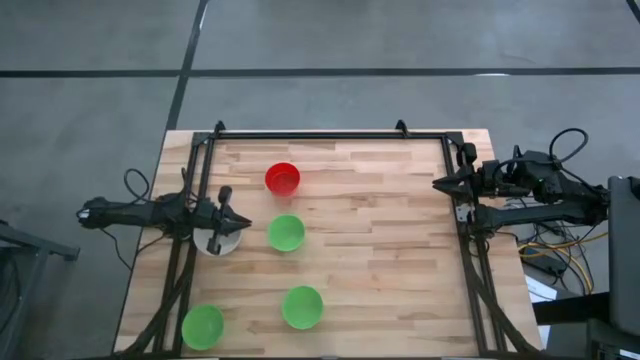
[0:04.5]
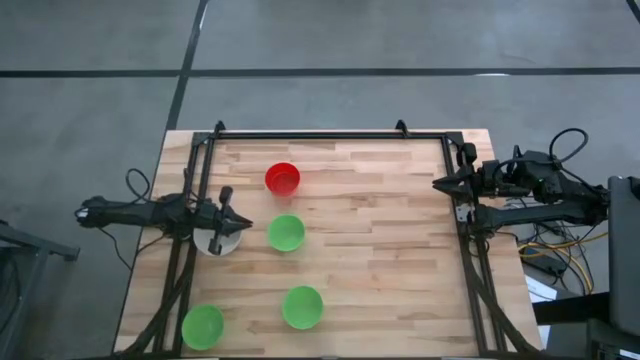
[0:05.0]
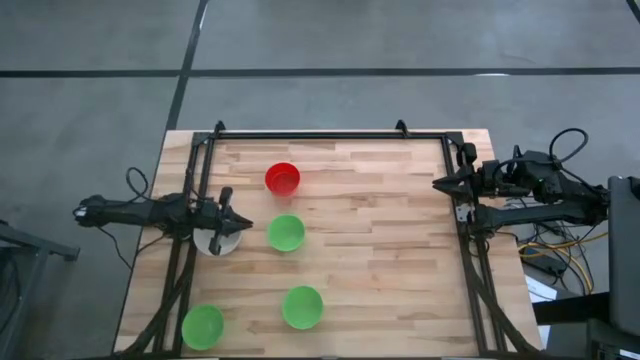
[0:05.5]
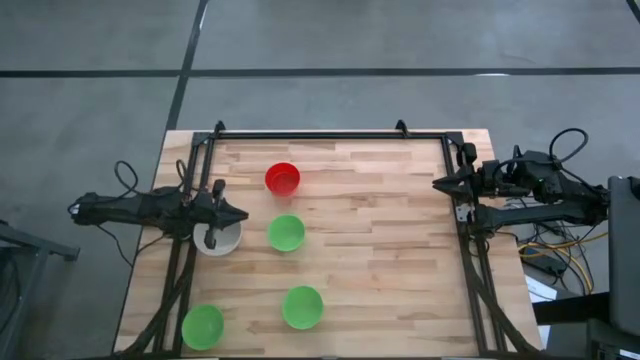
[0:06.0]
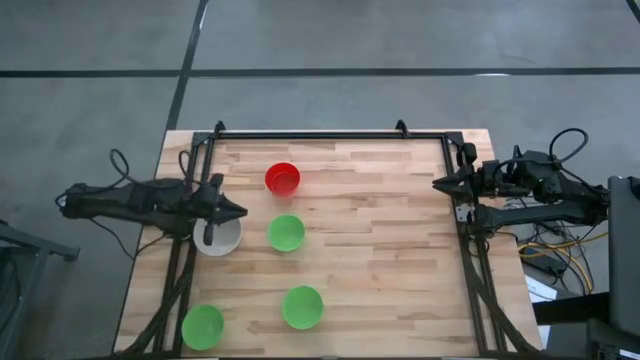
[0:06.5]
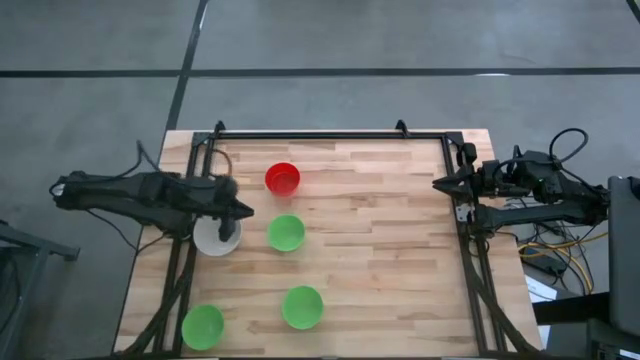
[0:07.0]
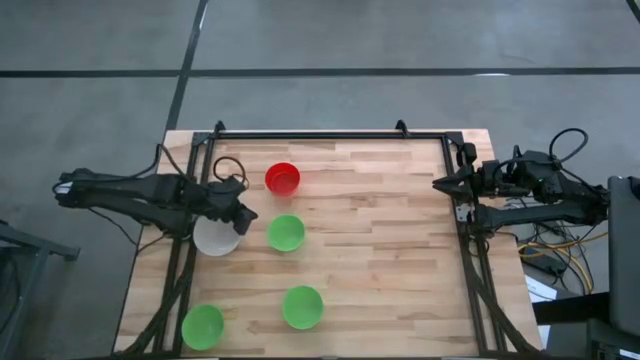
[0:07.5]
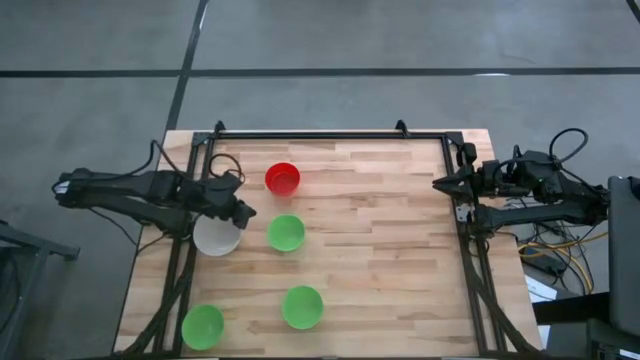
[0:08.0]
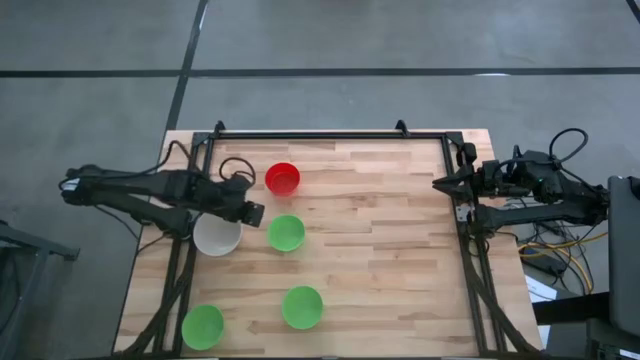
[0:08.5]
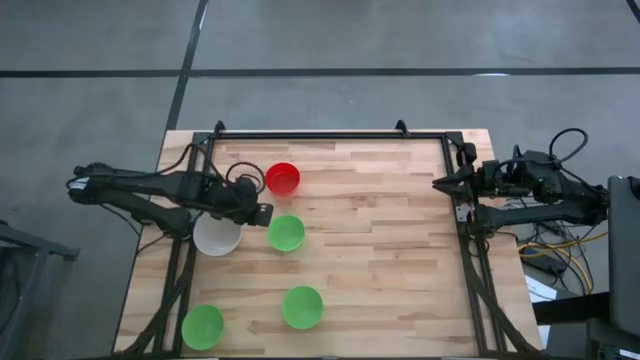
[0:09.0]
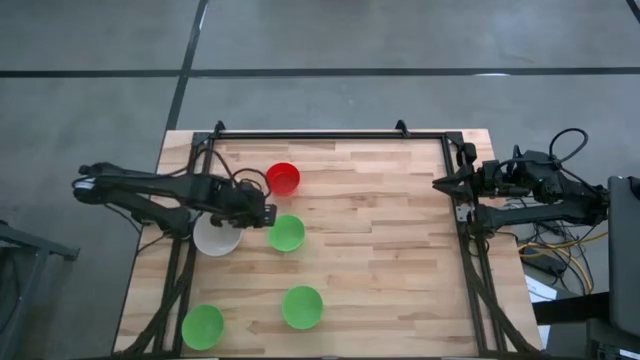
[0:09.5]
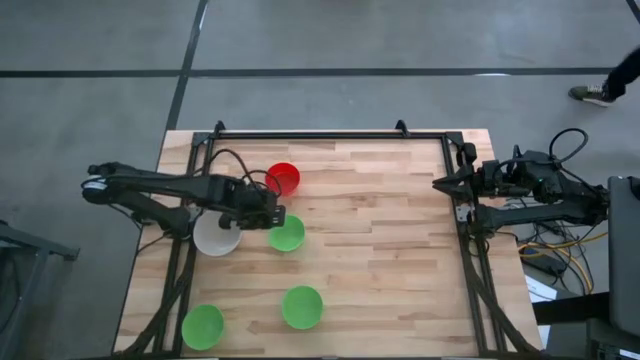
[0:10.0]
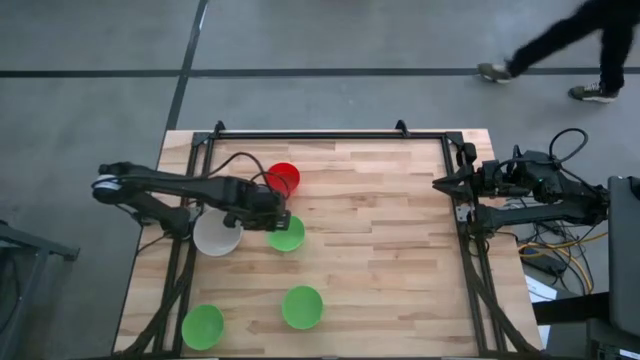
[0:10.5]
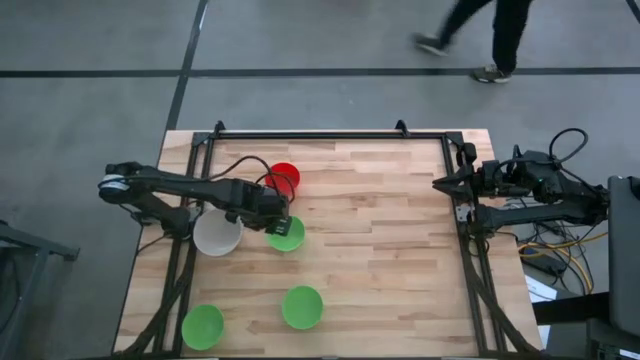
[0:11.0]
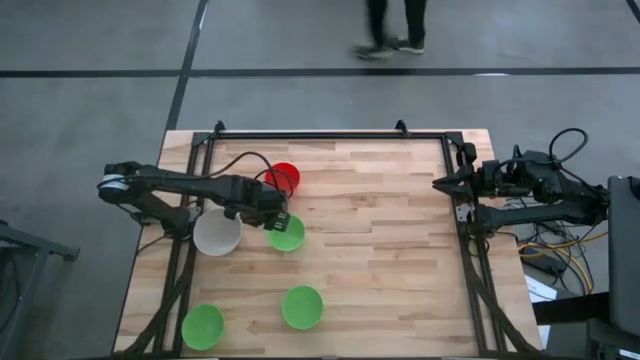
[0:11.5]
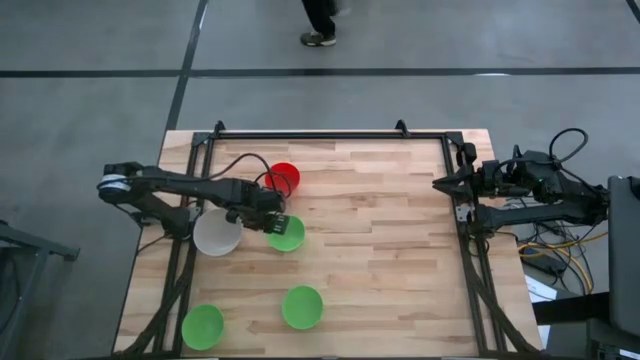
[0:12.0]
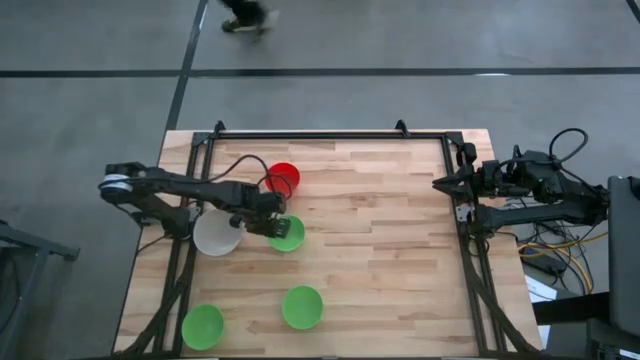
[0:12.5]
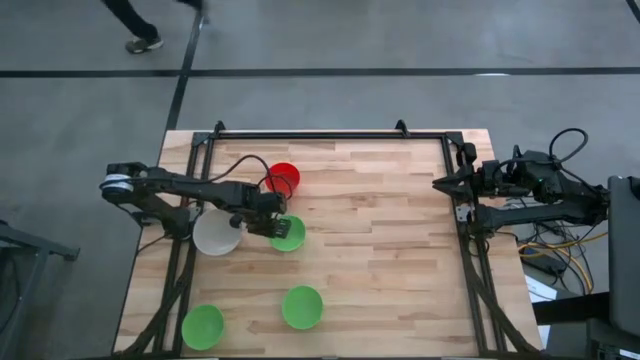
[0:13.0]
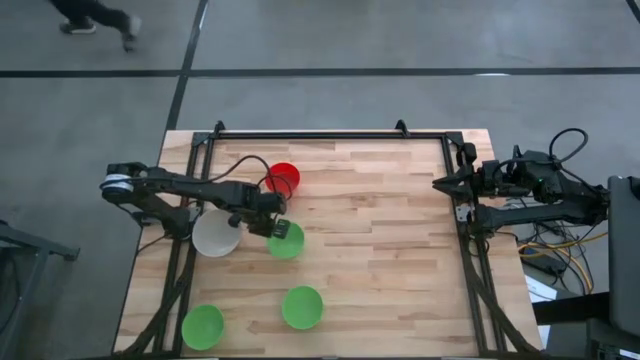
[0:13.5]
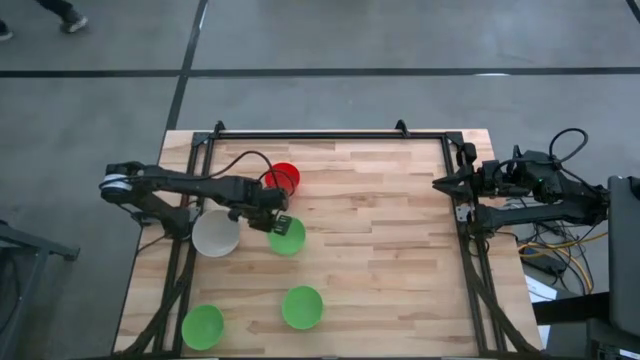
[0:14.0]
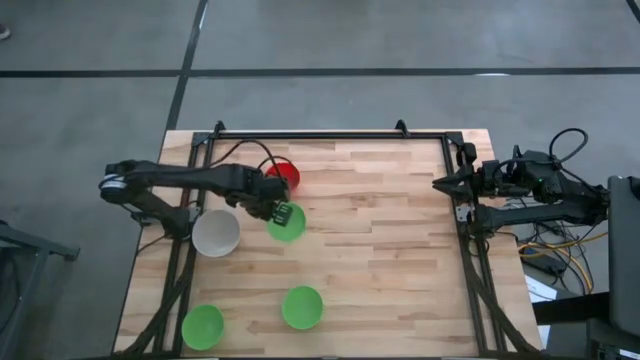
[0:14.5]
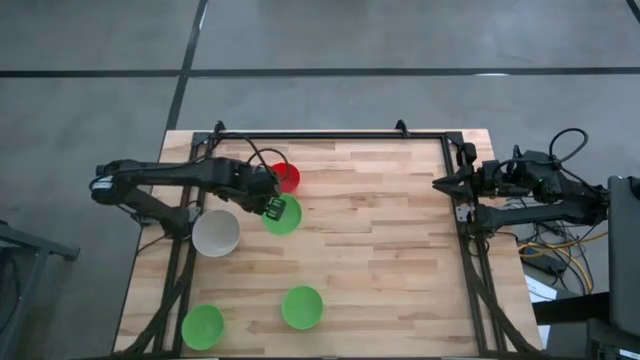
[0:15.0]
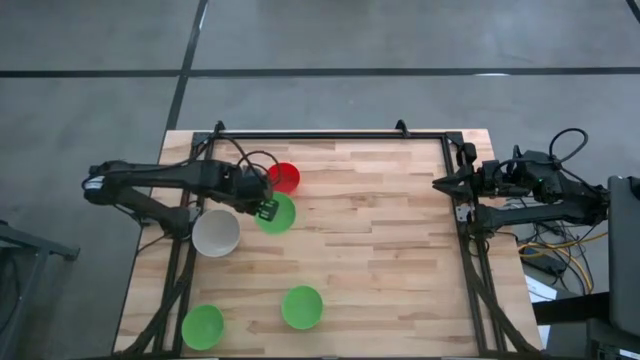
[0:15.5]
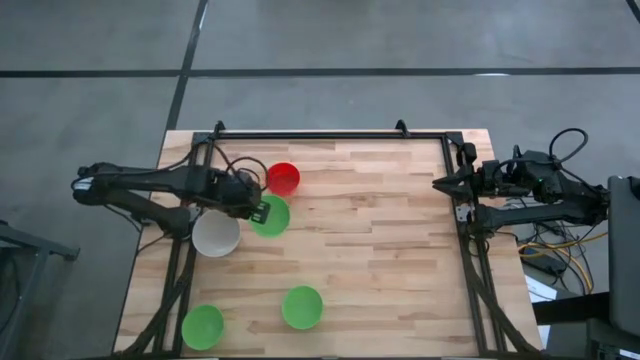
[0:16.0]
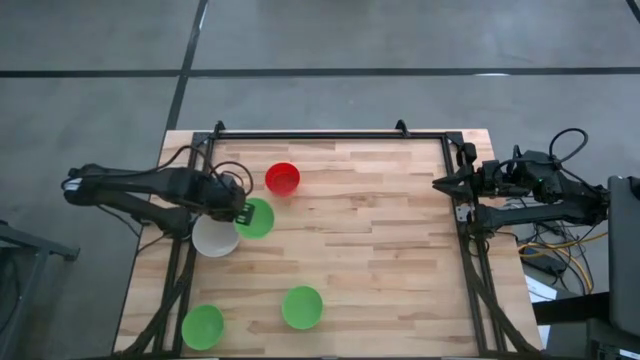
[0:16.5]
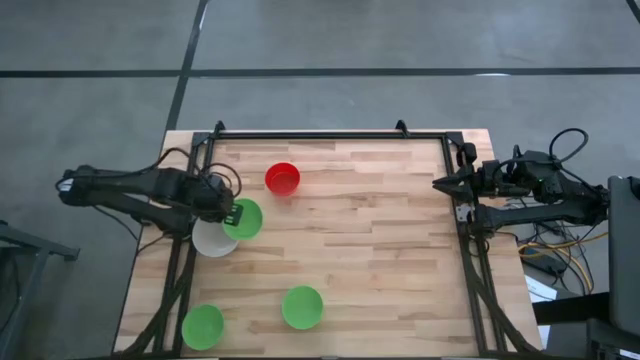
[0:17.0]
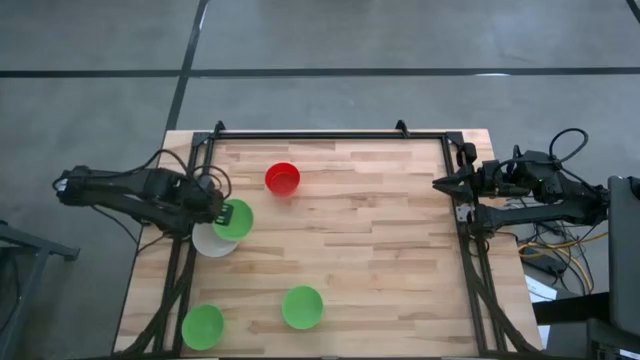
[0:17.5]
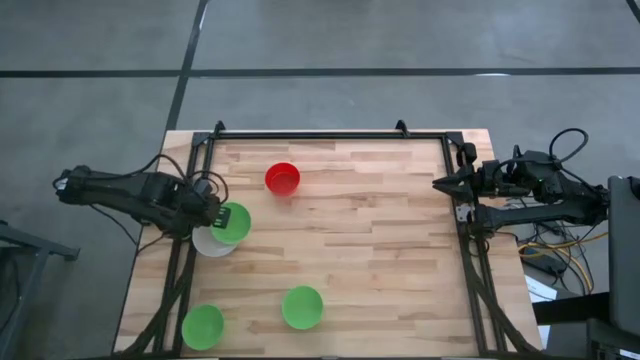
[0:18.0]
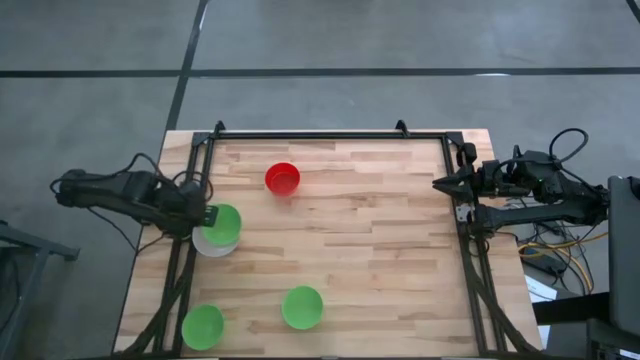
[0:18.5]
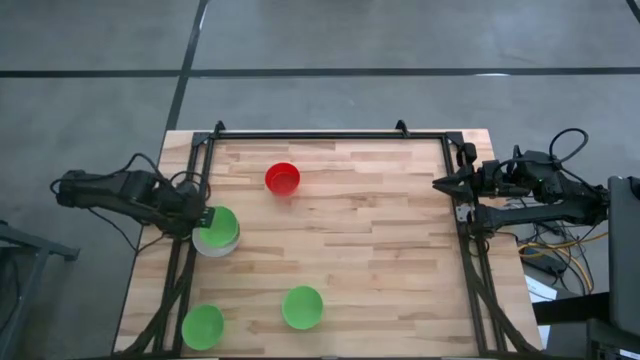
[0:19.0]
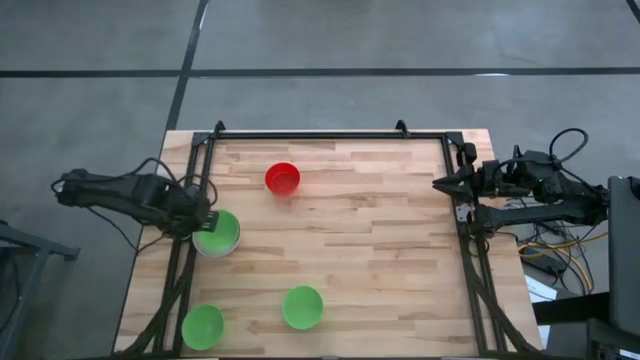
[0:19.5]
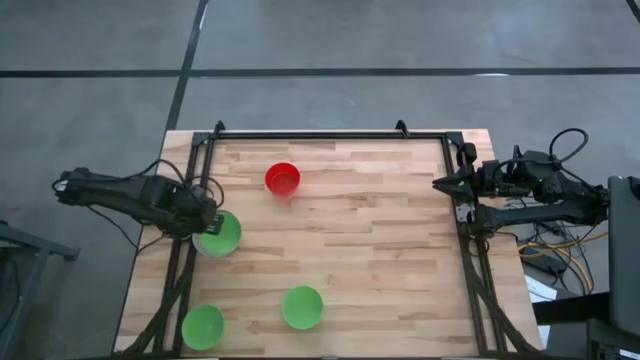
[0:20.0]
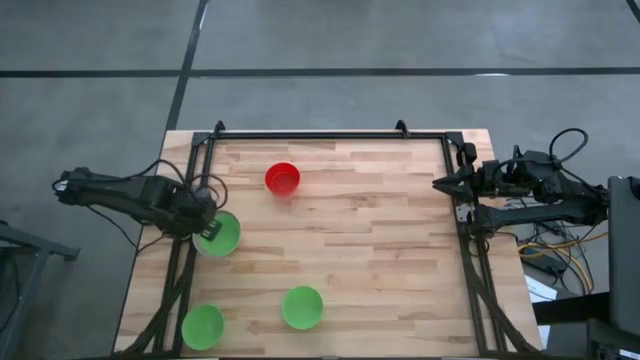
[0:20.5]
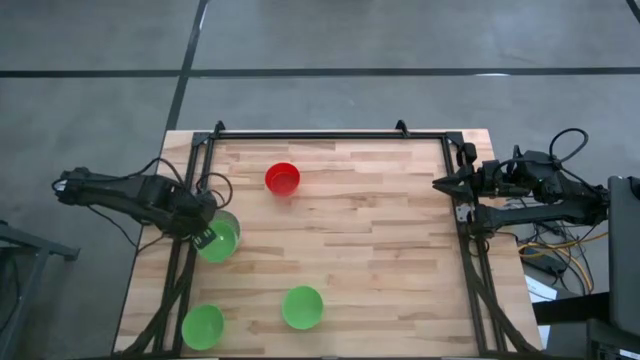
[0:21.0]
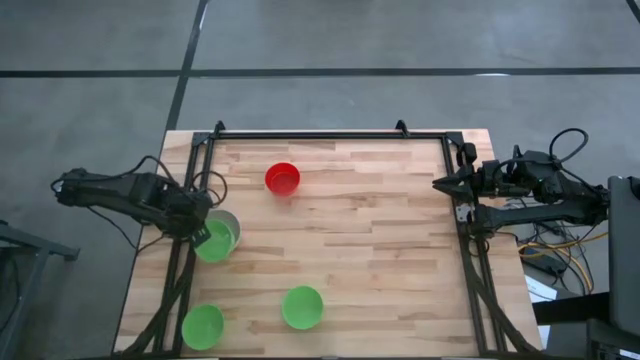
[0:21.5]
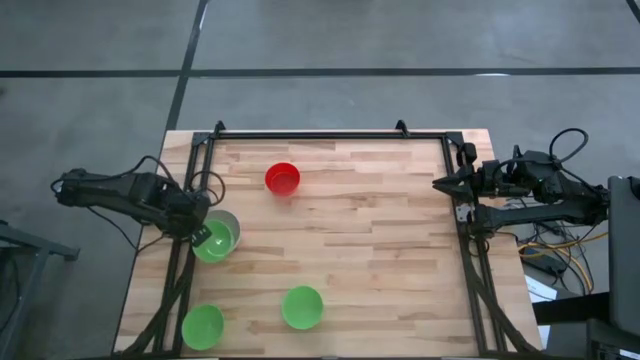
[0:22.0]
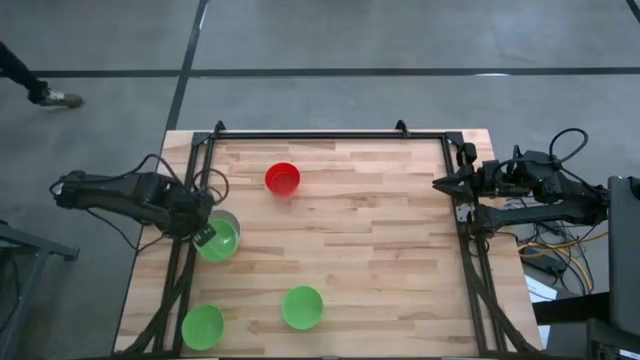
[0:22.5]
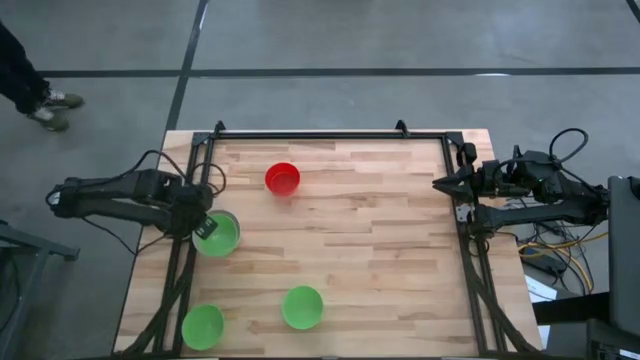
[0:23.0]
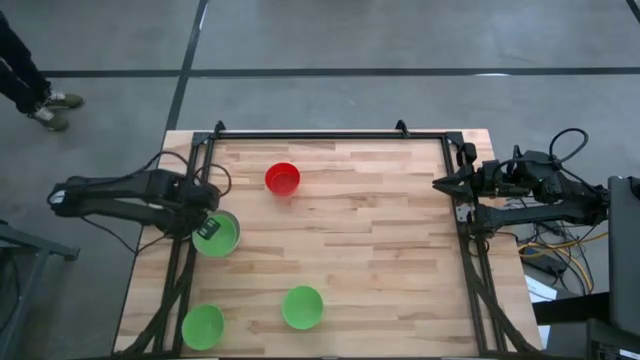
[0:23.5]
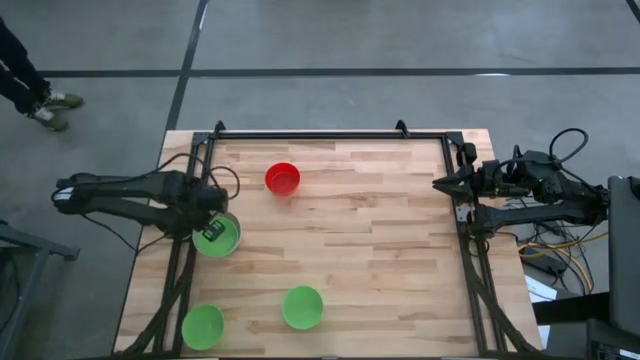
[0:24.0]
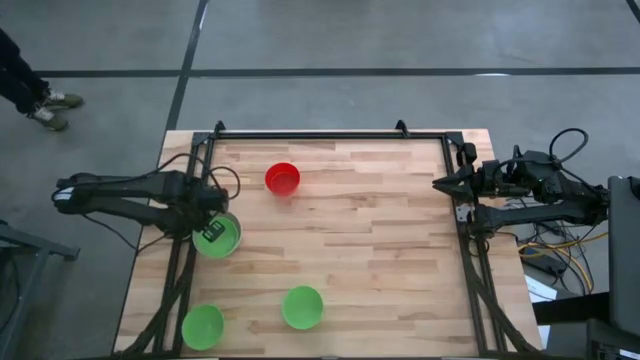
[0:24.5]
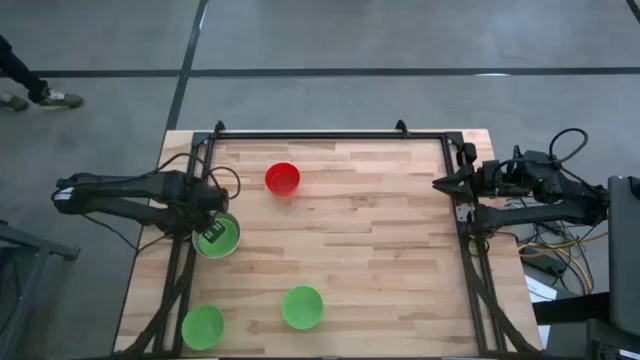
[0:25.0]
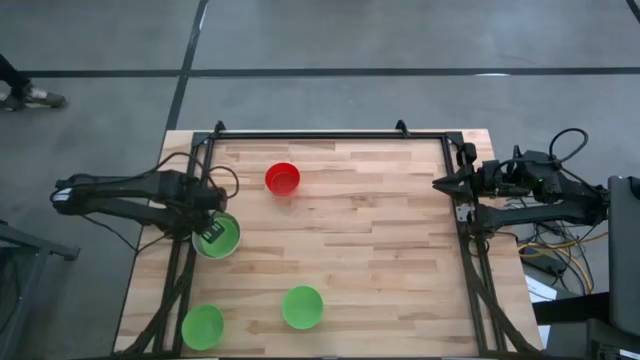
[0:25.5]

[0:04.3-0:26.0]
Stack the top green bowl on top of the white bowl
